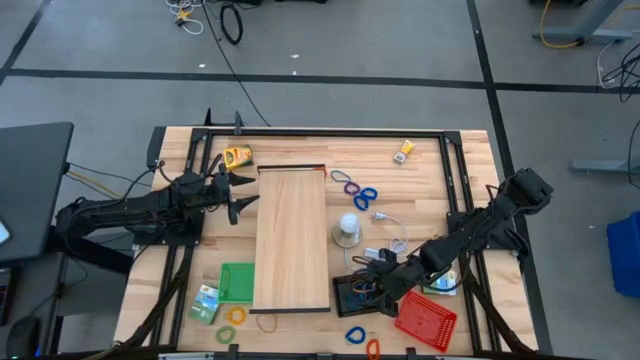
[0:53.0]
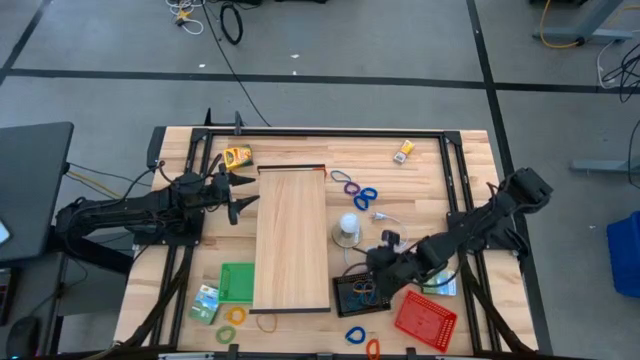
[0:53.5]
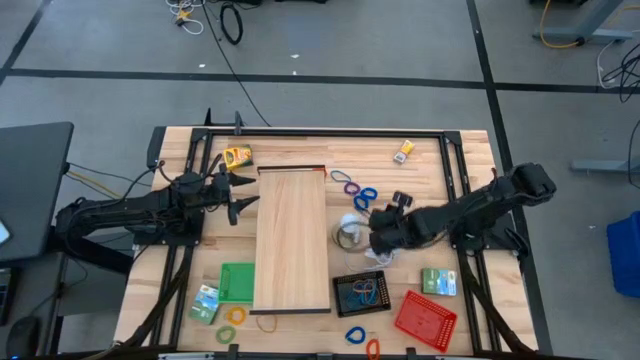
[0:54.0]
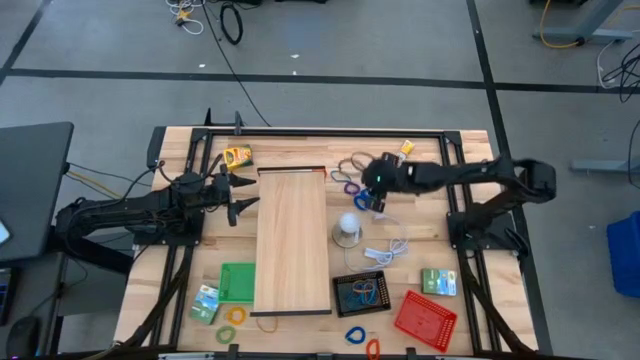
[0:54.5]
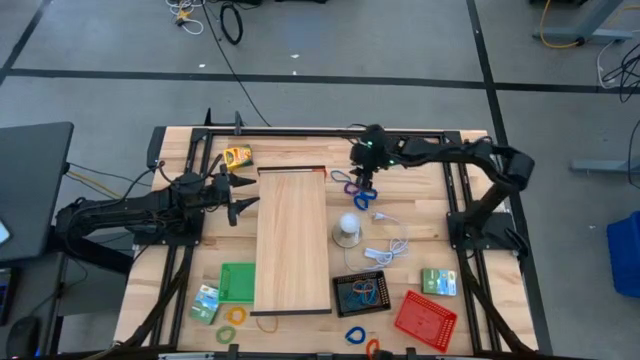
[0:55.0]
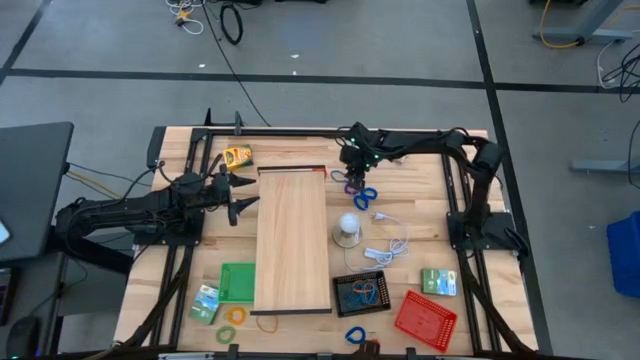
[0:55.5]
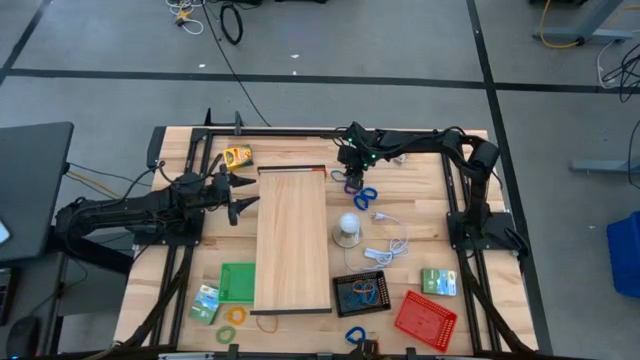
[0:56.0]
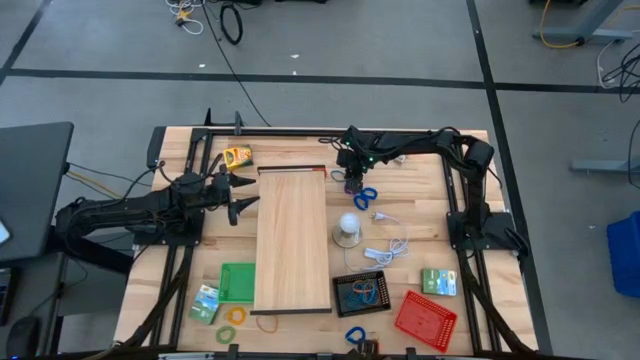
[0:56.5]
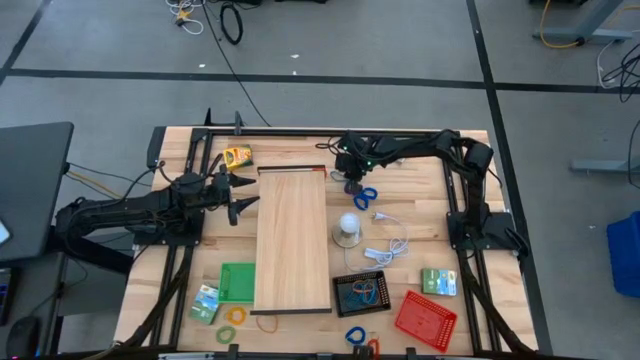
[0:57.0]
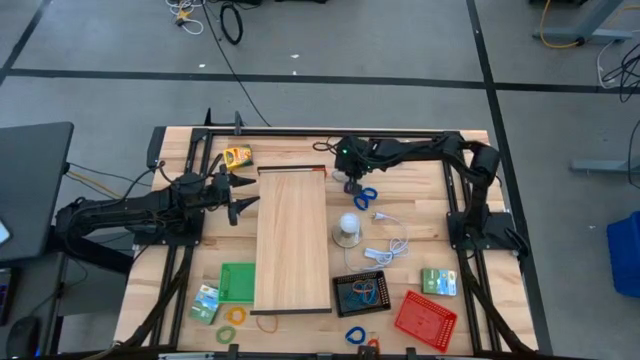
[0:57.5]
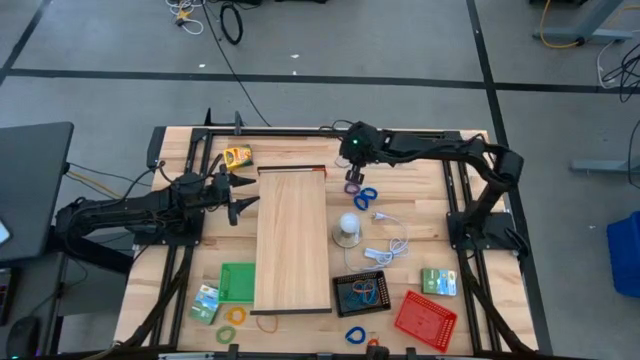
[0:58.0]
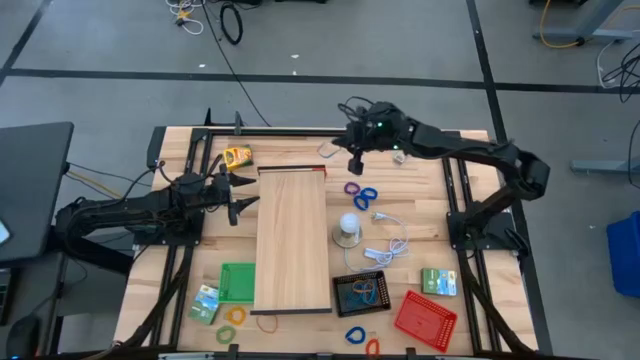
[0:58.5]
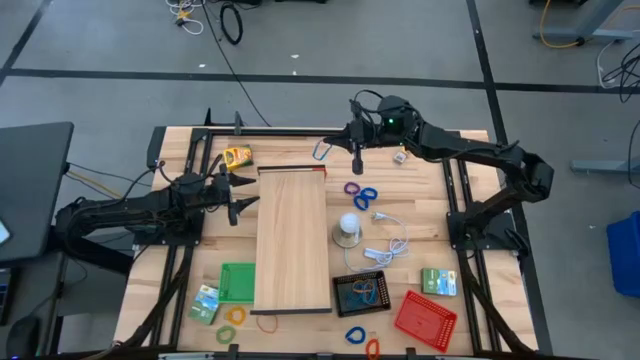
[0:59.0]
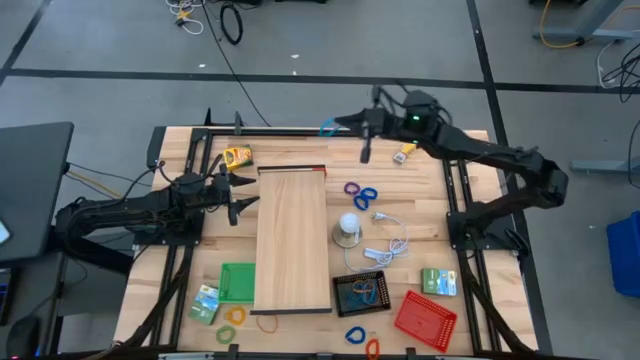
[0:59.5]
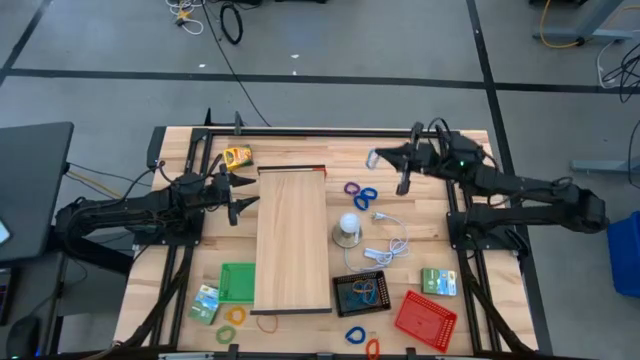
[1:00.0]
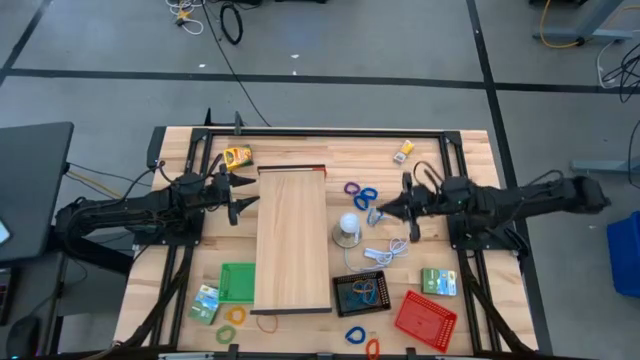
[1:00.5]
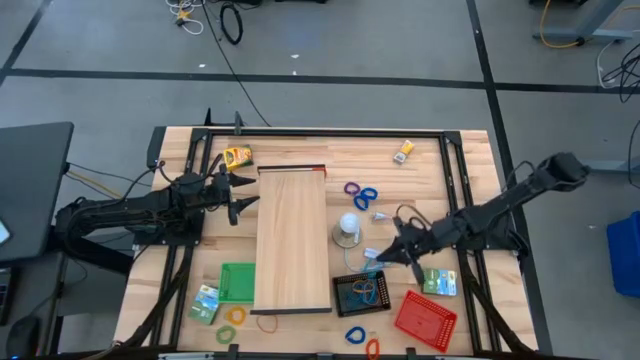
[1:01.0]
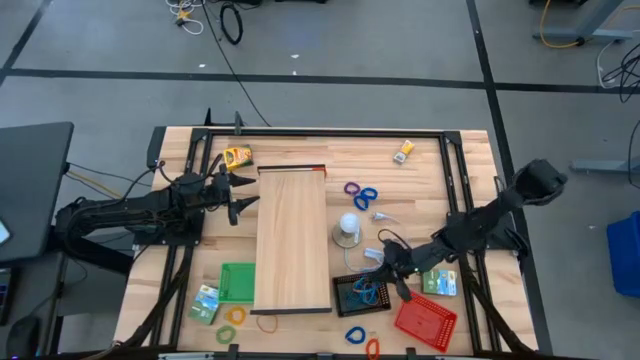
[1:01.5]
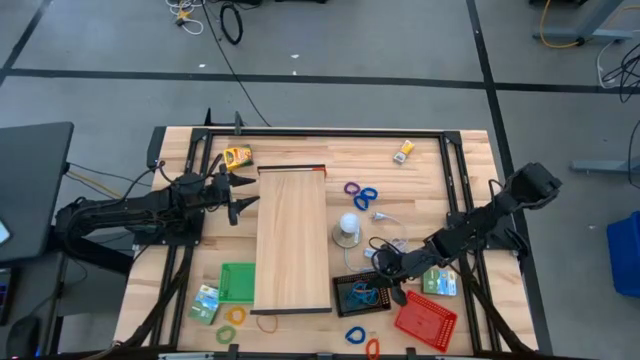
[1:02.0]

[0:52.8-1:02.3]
Task: Pick & Place Office Desk Supplies
Put the blue rubber band into the black bin

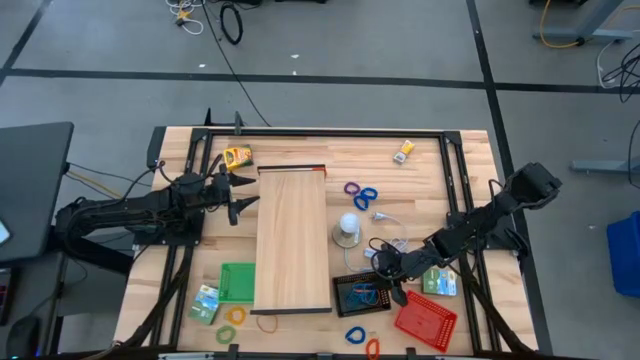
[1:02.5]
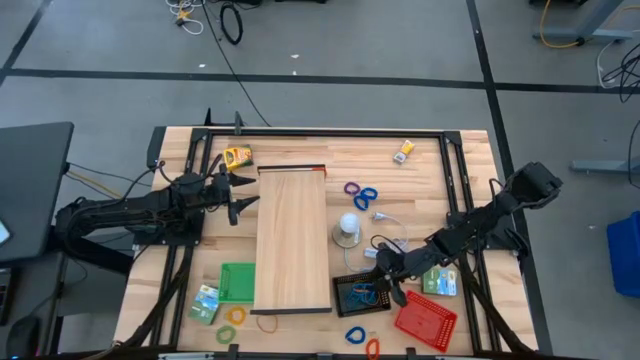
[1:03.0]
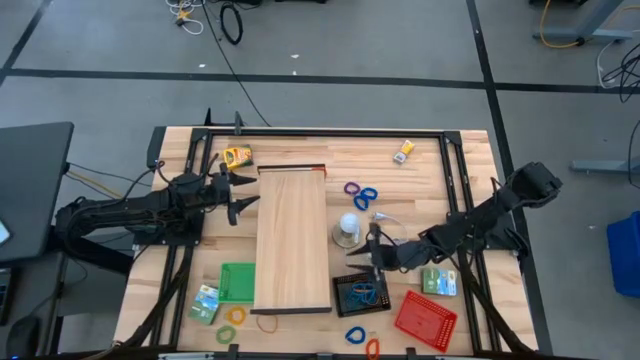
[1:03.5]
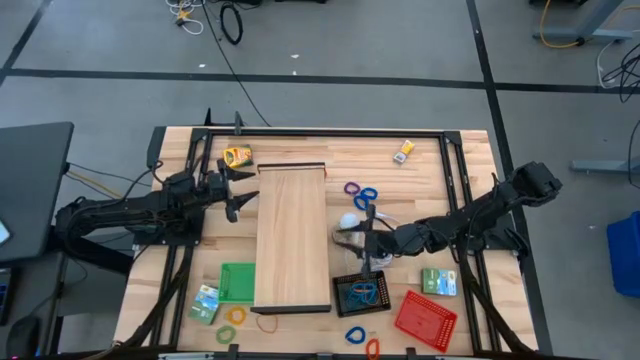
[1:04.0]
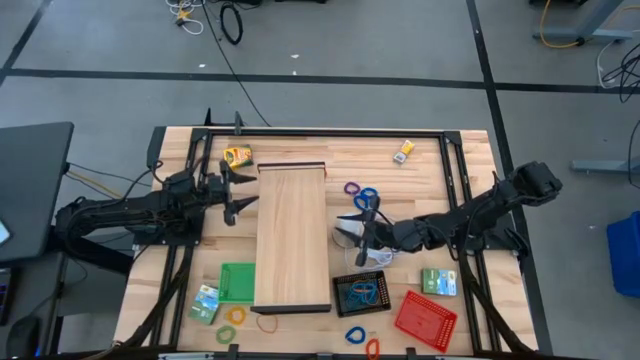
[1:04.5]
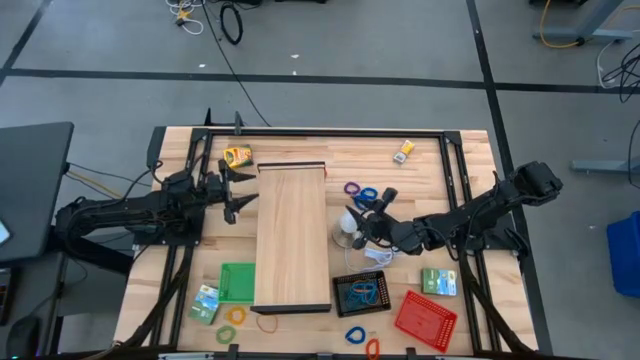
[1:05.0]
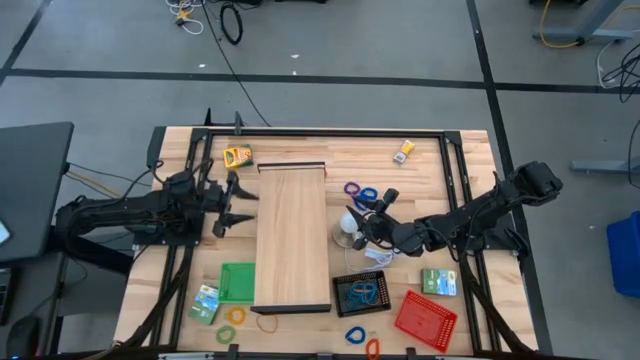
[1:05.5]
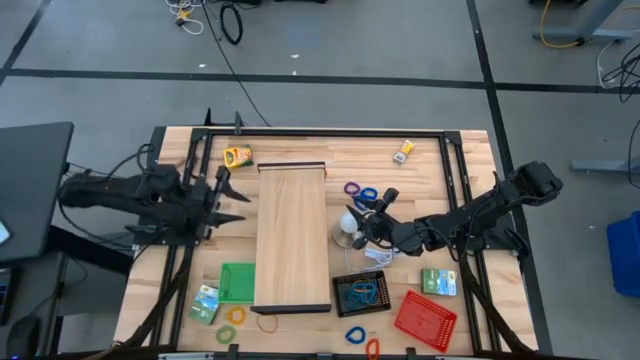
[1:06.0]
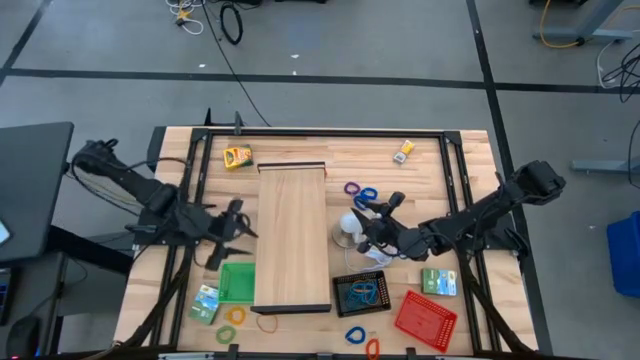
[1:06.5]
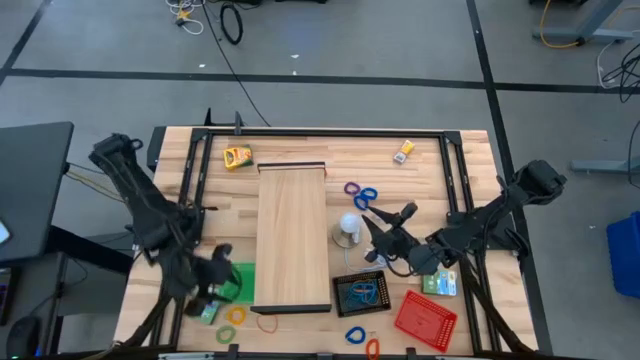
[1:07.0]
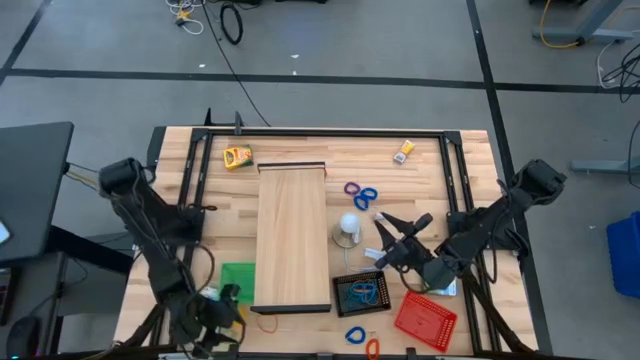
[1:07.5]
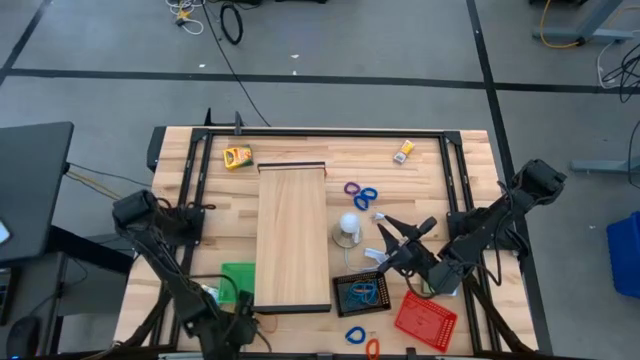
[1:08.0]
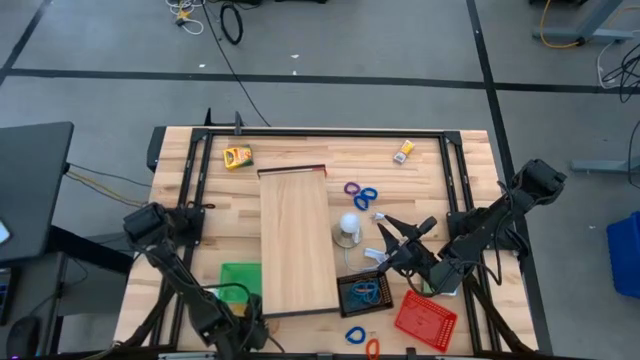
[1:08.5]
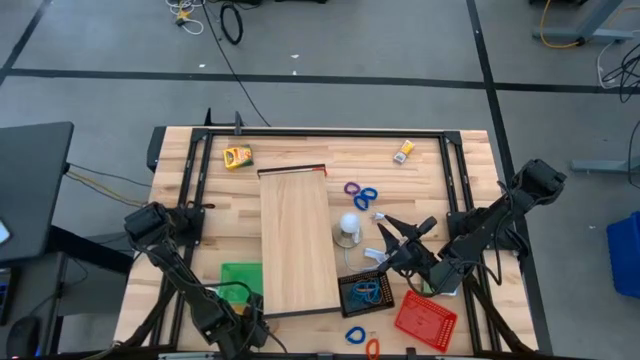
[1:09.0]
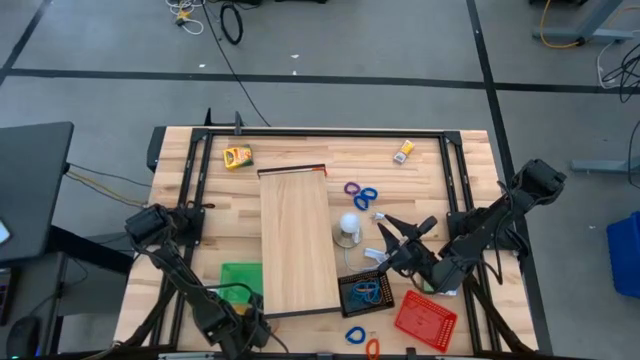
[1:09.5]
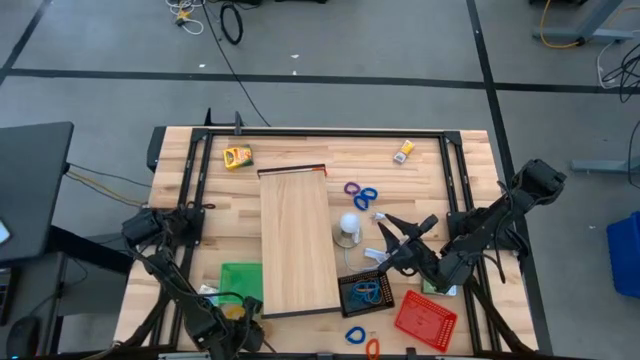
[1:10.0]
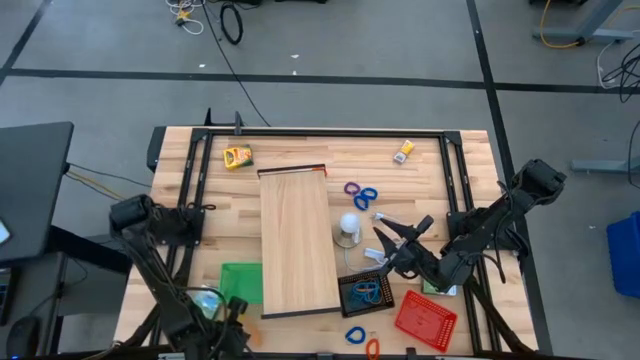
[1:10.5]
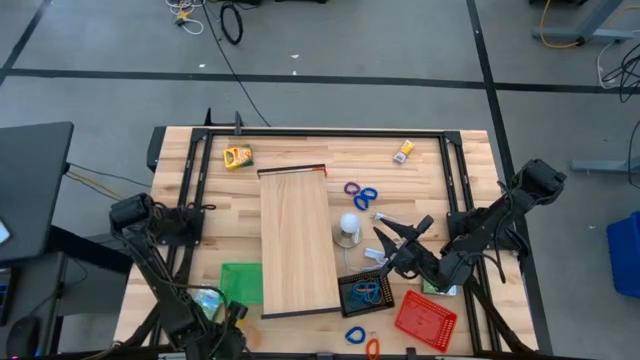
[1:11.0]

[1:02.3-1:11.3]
Put the orange rubber band into the black bin

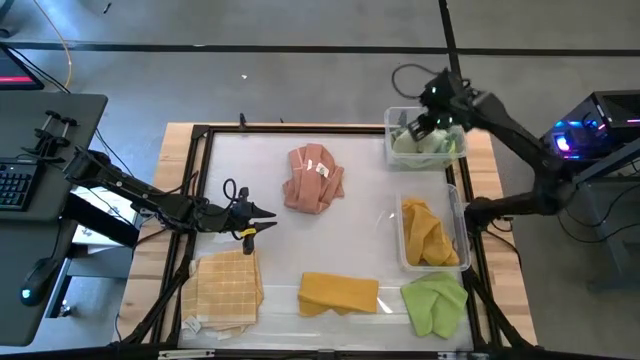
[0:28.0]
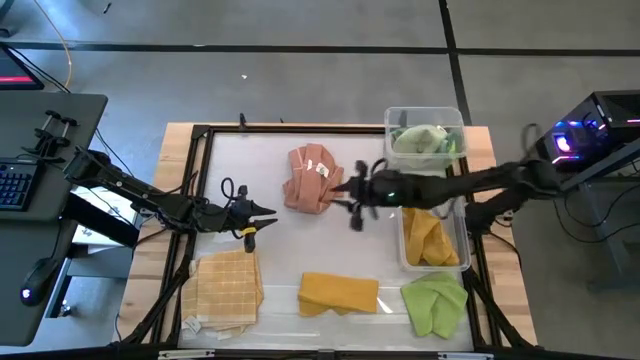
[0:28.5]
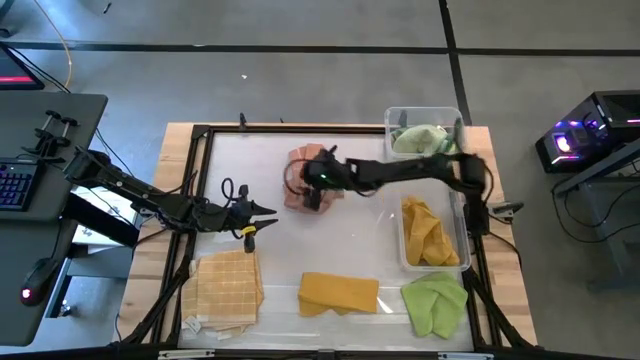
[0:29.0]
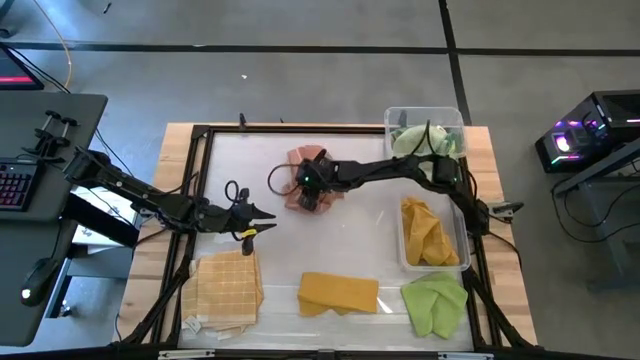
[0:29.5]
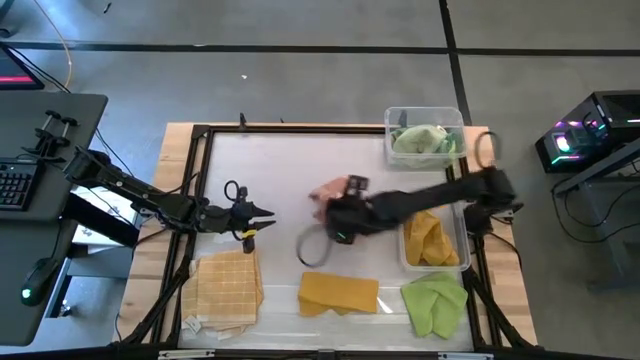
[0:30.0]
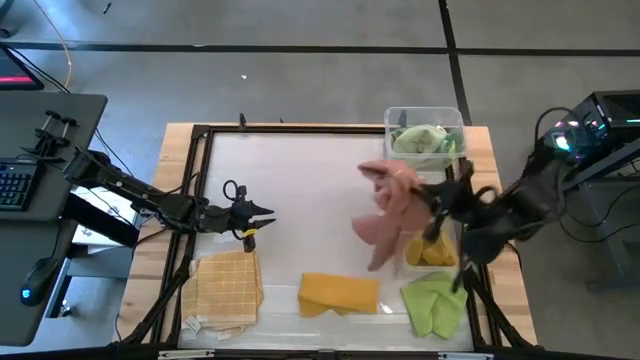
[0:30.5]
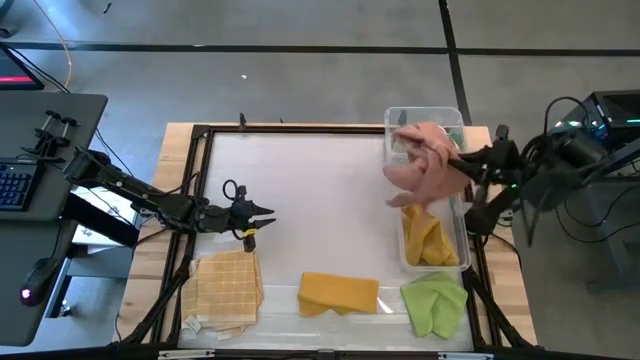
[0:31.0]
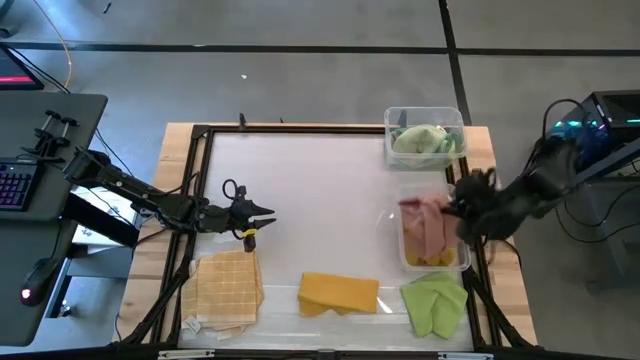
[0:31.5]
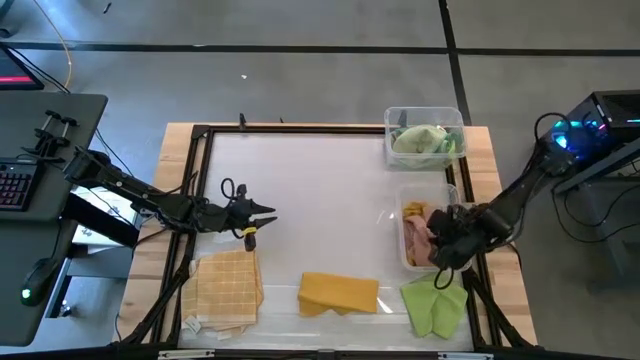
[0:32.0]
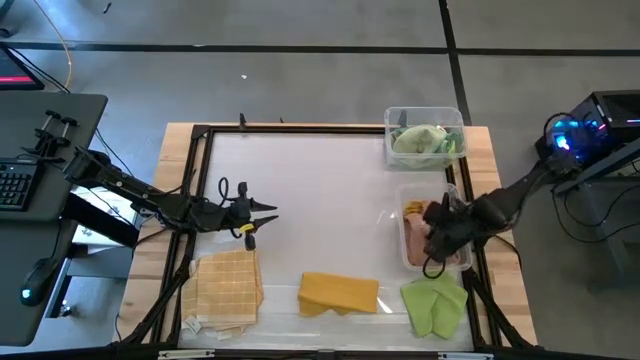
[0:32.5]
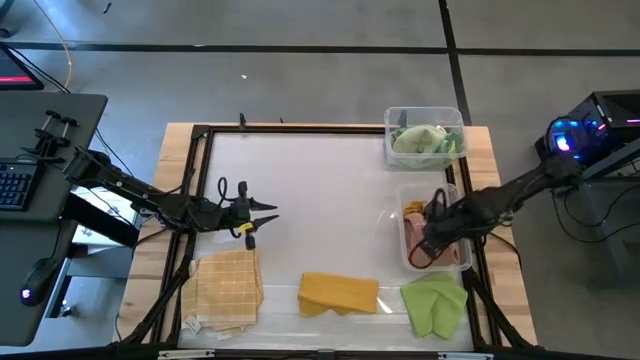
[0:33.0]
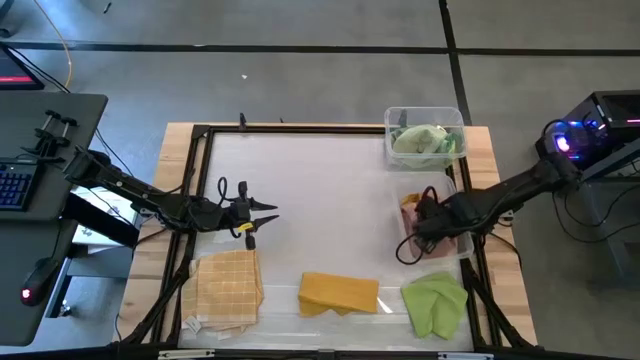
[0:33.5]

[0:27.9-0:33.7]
Task: Sort towels by color in basket
Put the brown kitchen towel into the bottom transparent bin
